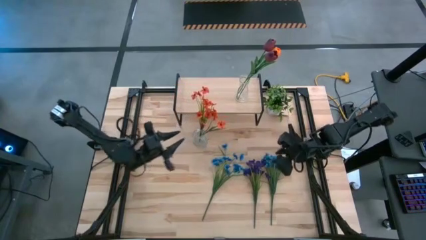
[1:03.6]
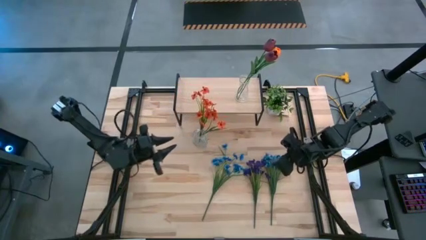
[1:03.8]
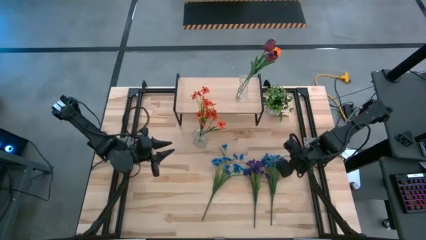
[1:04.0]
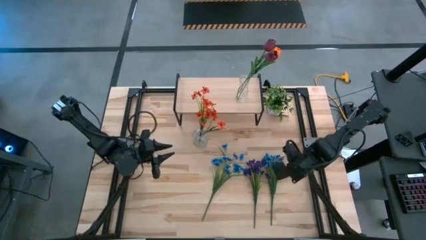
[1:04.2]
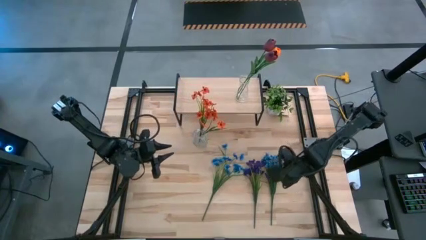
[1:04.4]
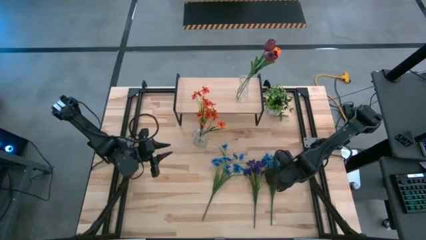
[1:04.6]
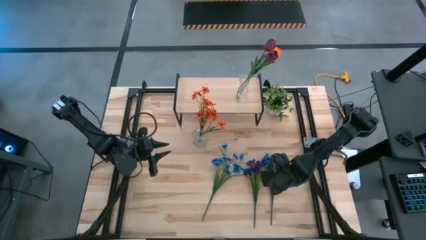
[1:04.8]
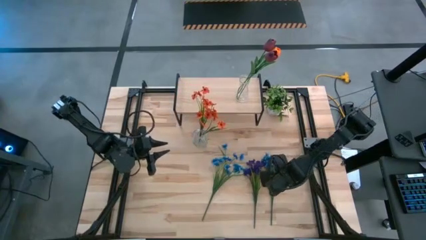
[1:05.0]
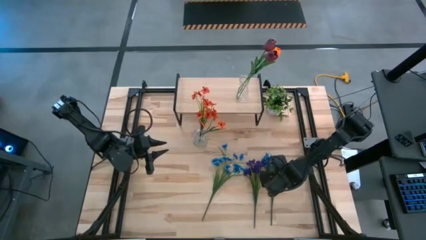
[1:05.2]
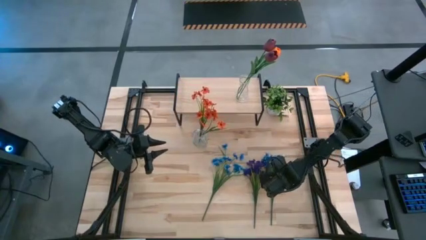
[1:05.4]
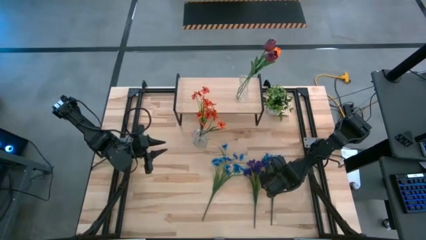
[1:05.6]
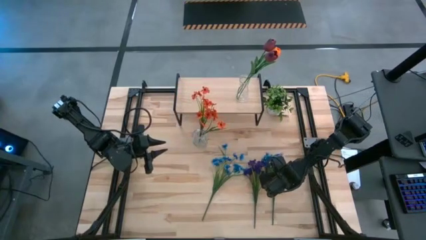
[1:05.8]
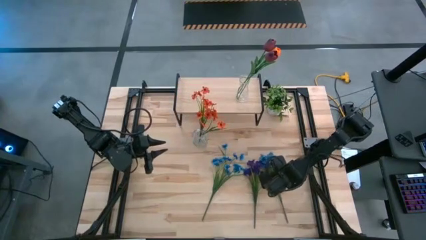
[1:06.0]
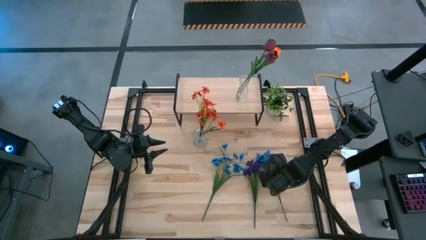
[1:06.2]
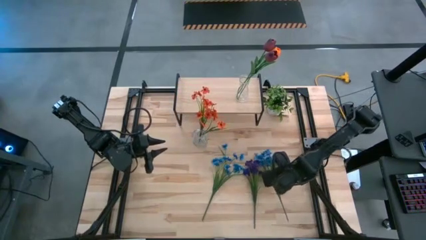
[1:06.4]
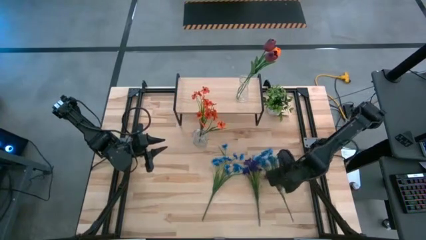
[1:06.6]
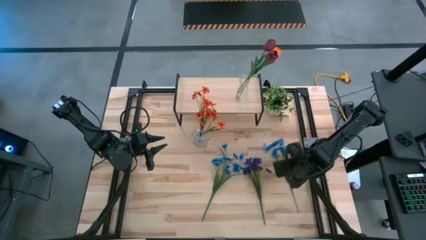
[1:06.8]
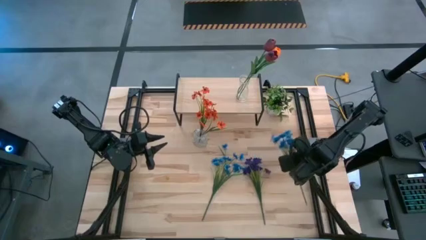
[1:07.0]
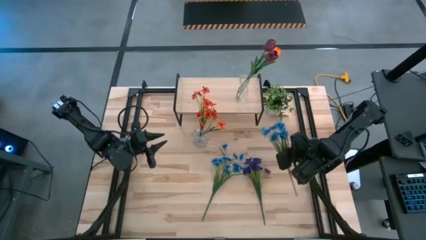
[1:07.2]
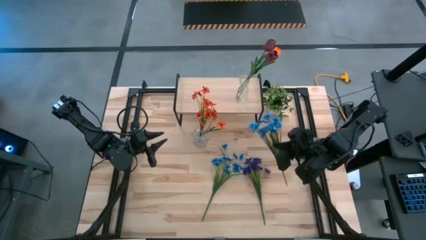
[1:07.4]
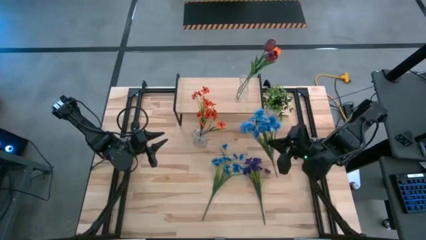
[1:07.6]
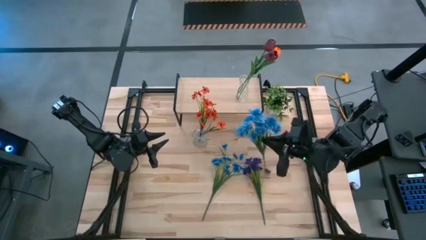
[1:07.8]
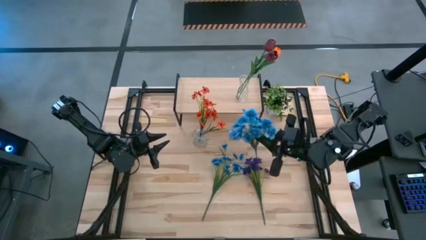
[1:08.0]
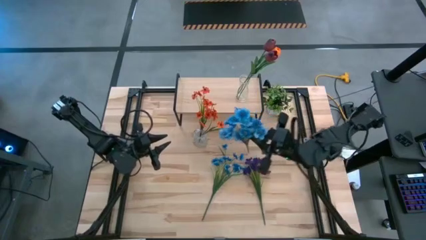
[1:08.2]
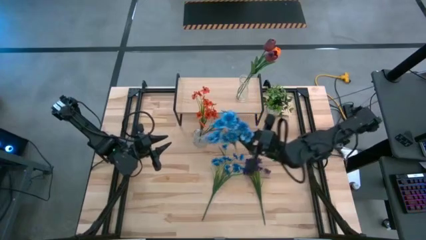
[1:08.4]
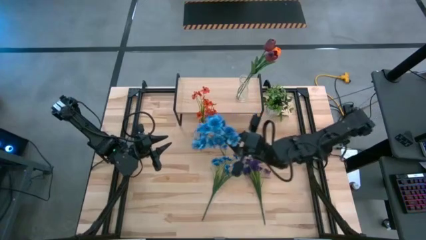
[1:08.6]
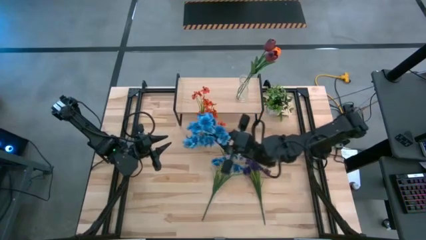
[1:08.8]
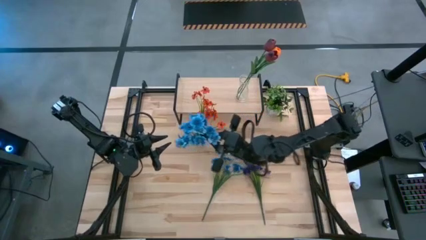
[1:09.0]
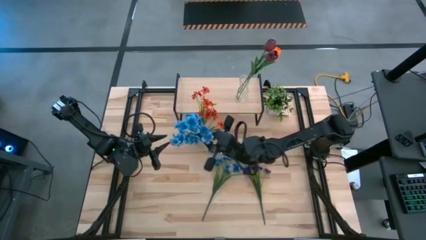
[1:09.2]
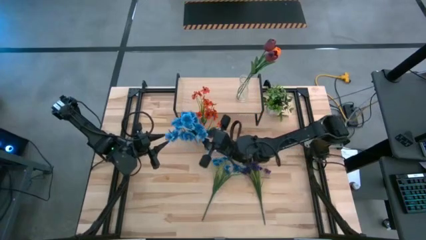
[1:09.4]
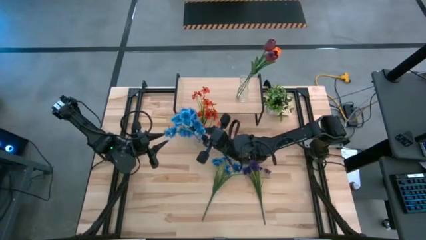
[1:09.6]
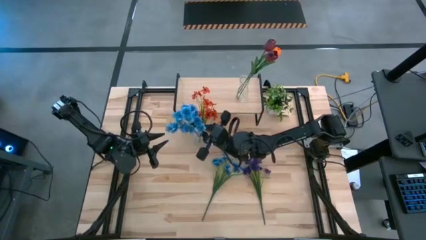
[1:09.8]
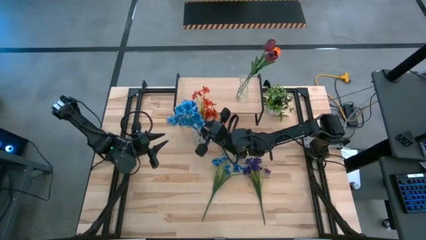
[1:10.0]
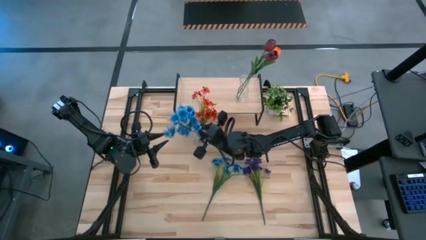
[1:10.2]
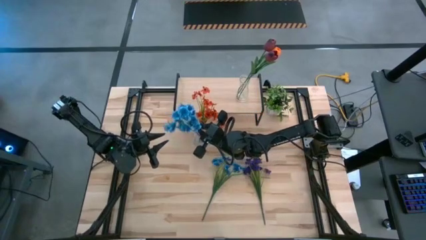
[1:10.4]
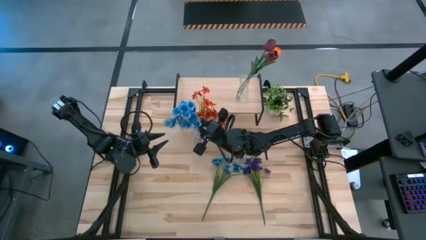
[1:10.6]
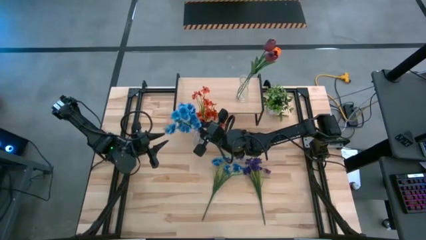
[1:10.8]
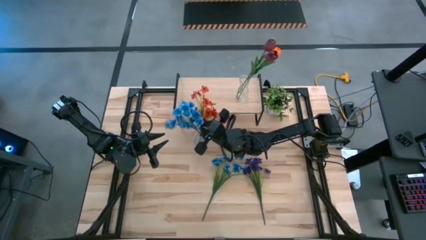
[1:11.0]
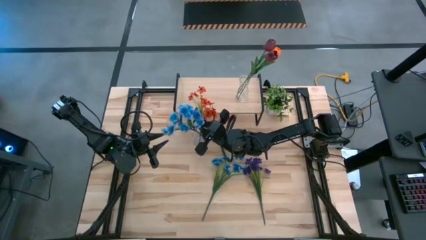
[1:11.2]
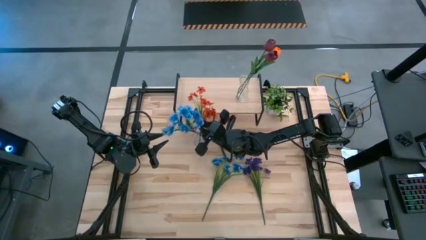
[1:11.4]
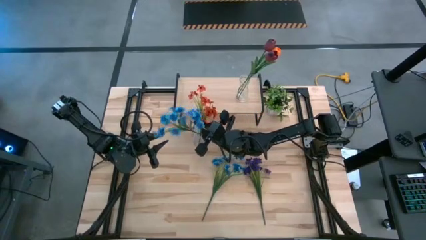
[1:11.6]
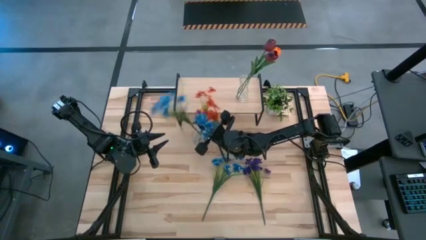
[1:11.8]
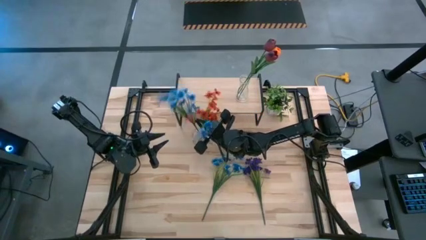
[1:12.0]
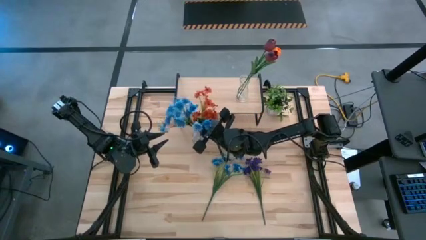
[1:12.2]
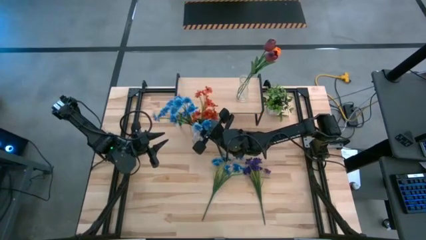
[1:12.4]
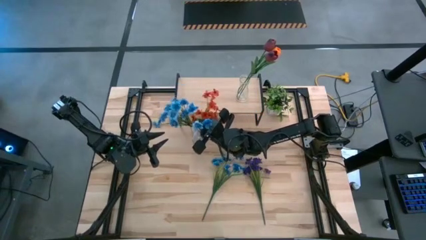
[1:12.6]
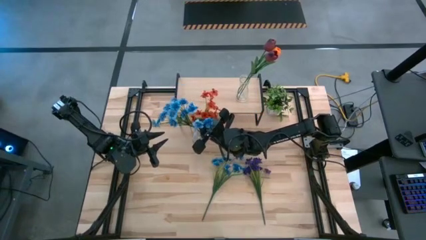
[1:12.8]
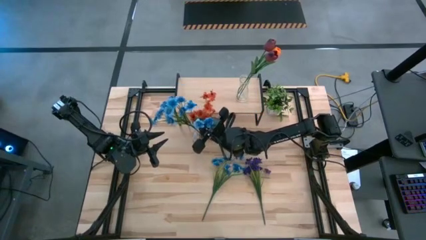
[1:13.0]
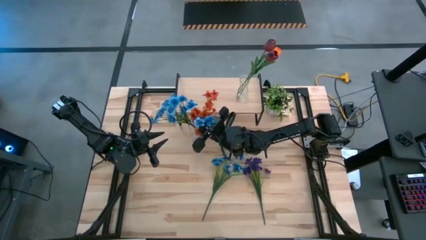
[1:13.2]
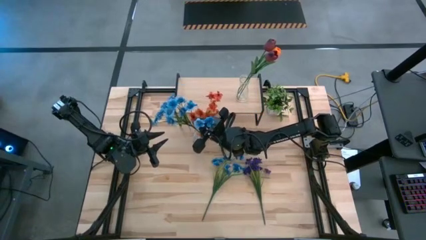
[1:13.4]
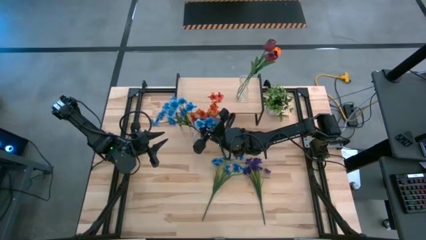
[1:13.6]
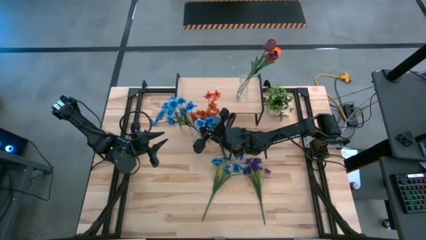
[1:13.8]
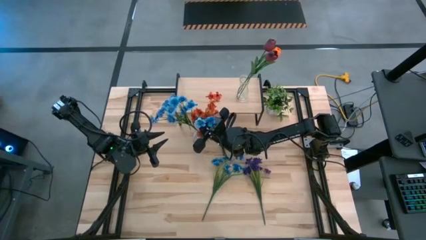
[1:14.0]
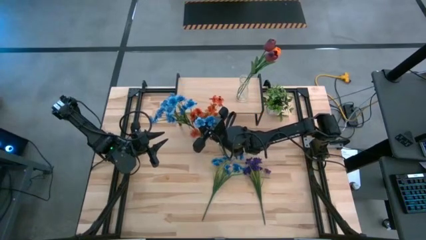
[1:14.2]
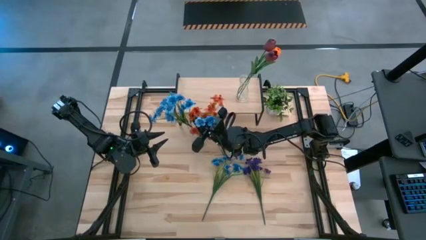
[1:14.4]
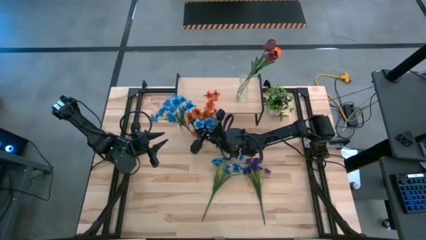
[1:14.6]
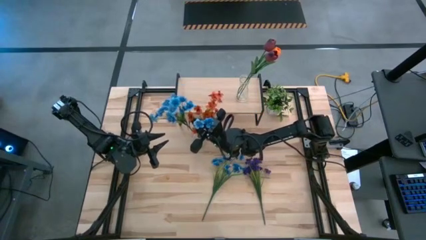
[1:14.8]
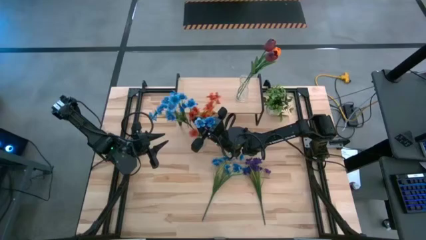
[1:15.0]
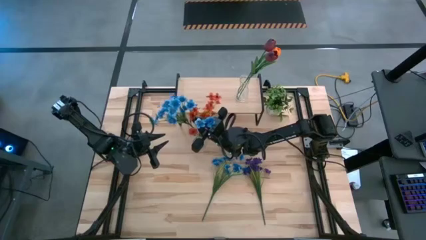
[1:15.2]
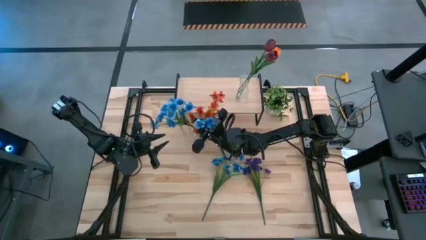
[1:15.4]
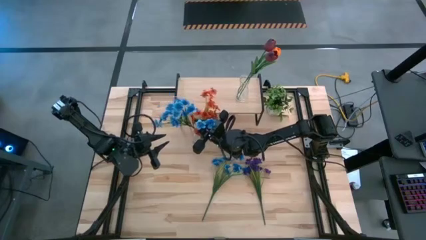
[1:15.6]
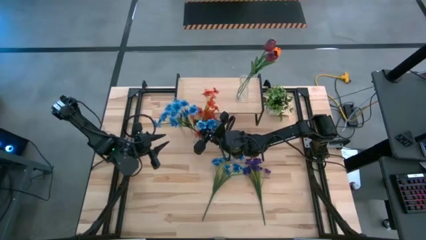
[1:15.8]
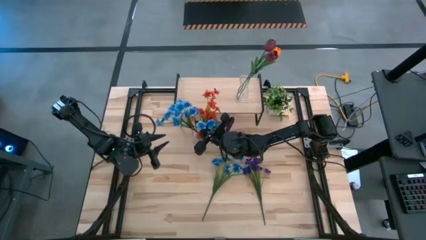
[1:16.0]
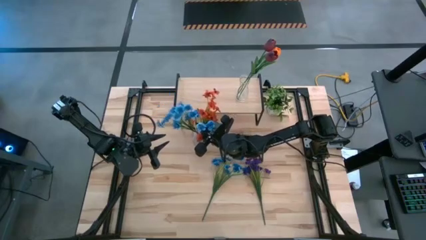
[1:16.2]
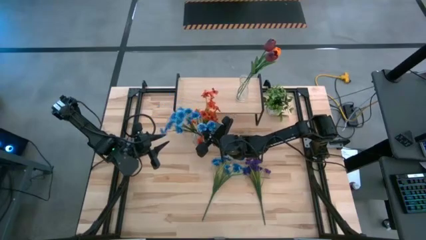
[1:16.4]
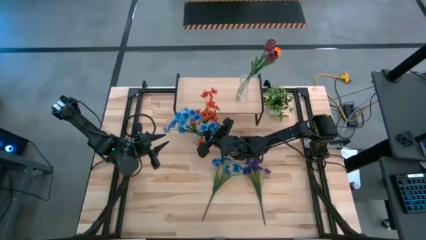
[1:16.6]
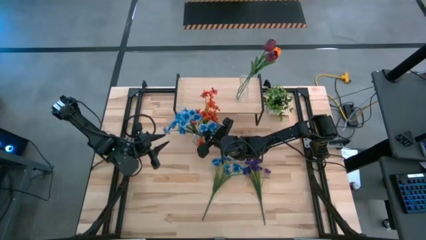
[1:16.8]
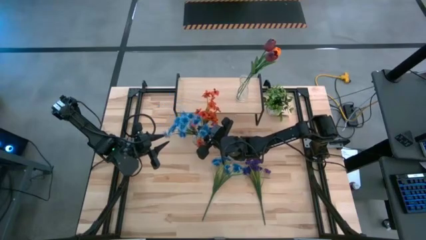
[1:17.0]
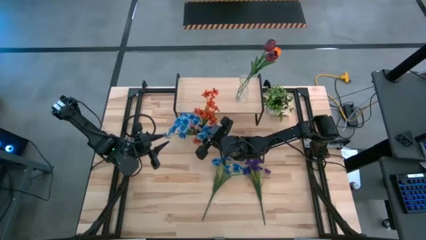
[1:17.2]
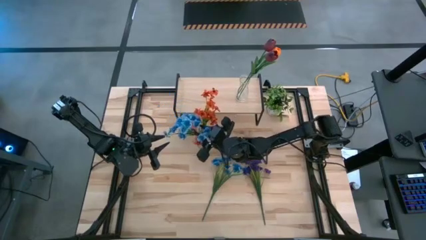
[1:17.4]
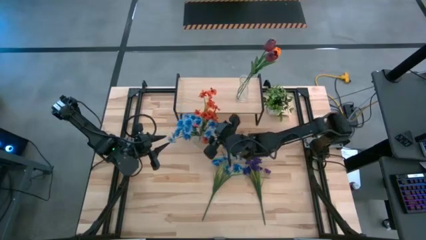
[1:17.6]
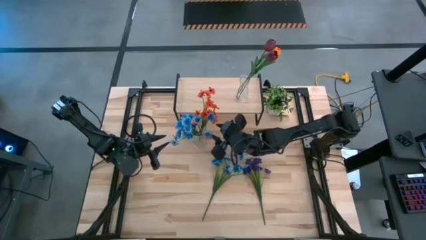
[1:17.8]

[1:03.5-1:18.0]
Task: Pick and place flowers into a vace then onto a shelf
Put the right blue flowers into the transparent vase
